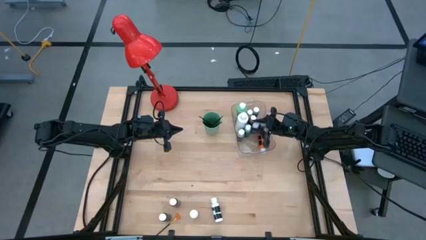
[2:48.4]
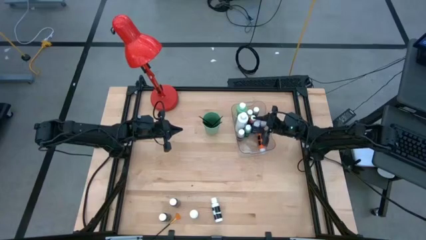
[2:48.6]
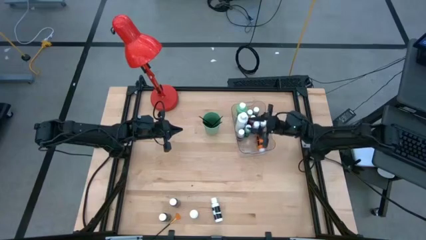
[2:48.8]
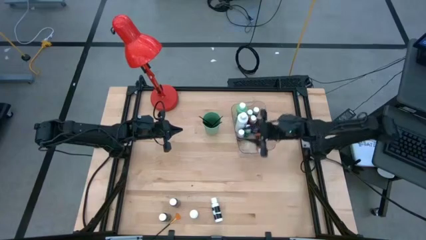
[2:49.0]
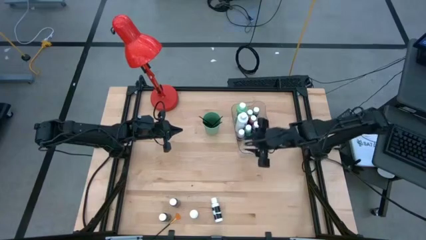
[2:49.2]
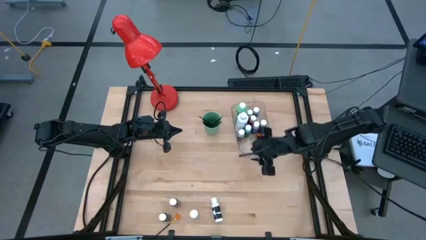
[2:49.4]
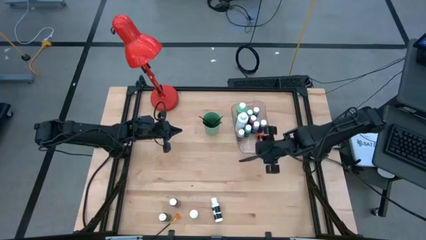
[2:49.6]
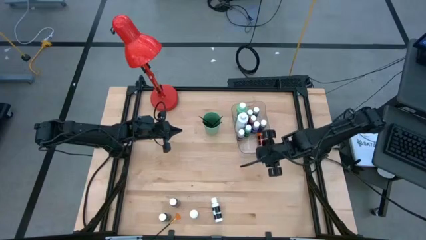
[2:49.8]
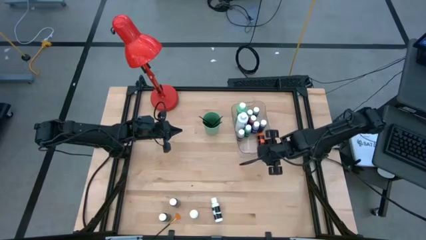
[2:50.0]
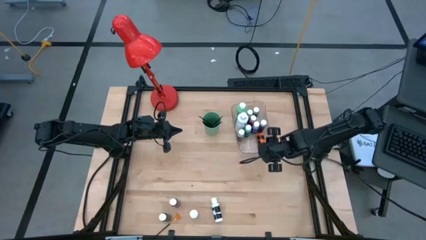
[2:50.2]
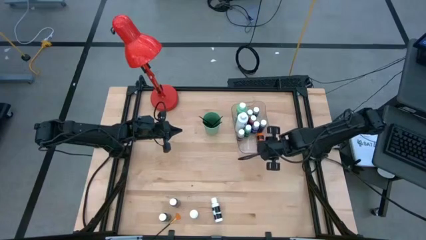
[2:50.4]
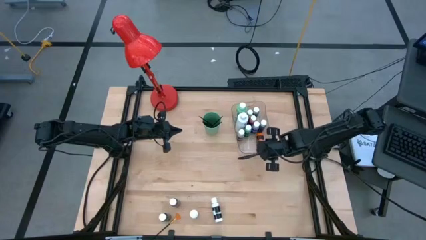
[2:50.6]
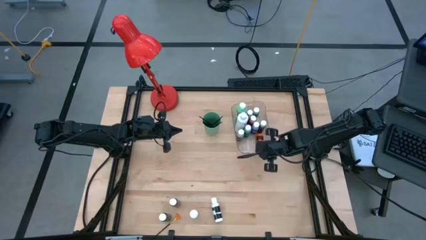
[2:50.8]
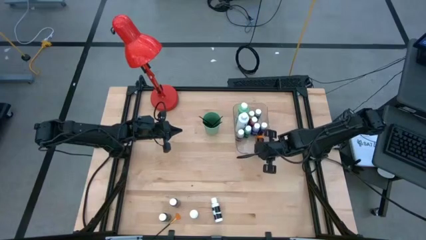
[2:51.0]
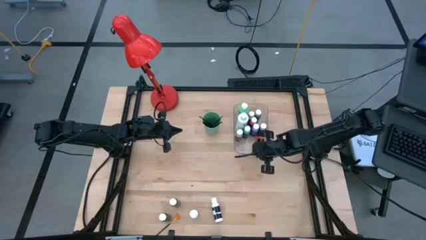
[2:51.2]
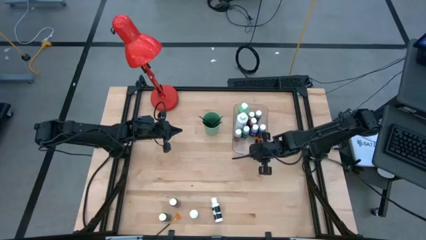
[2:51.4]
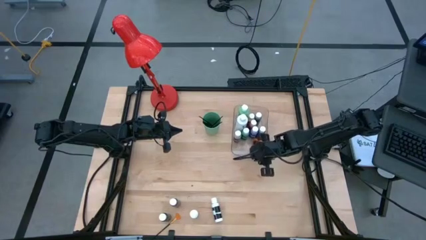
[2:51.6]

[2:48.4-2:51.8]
Task: Pick & Place Paint Supplies
Adjust the transparent bin

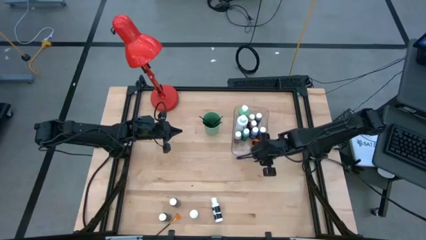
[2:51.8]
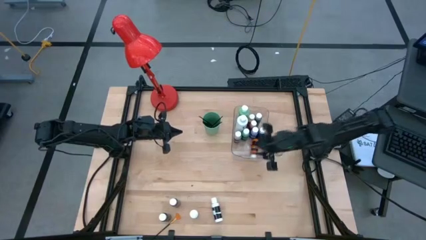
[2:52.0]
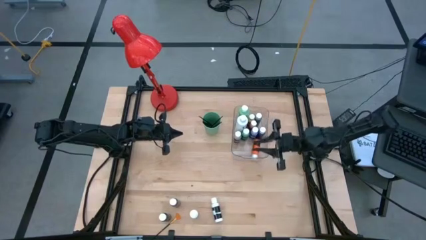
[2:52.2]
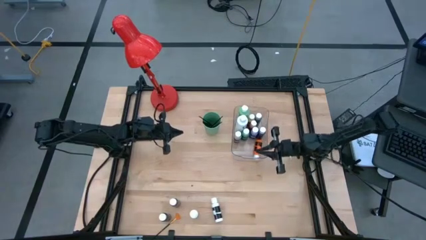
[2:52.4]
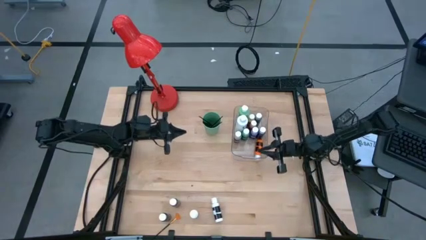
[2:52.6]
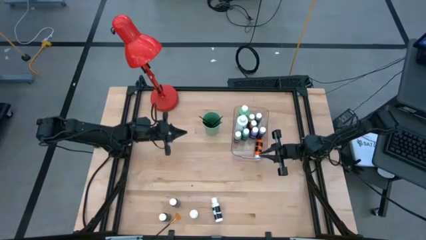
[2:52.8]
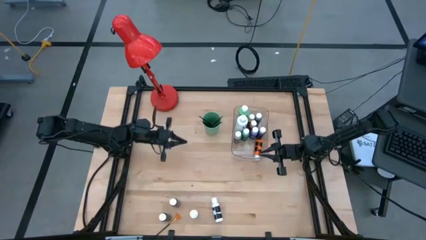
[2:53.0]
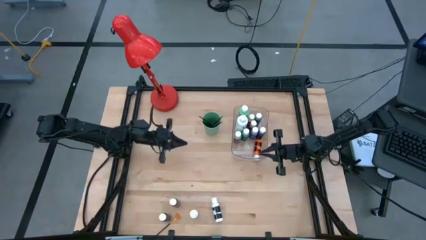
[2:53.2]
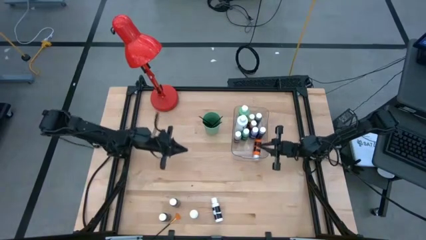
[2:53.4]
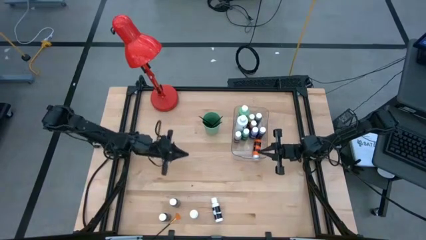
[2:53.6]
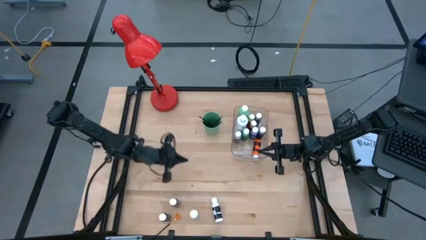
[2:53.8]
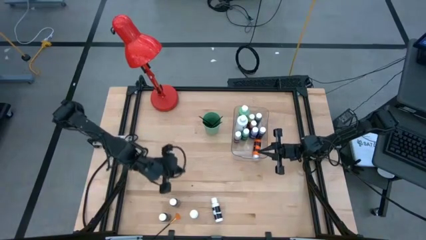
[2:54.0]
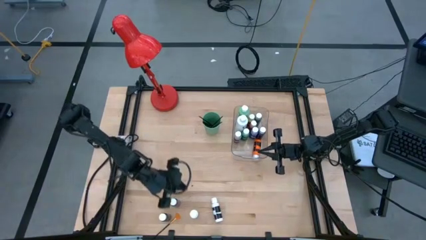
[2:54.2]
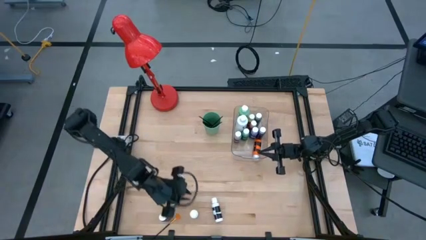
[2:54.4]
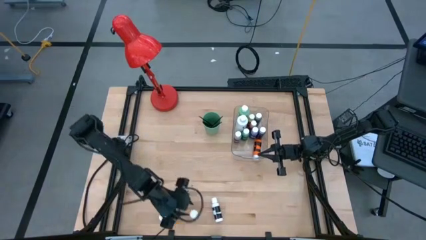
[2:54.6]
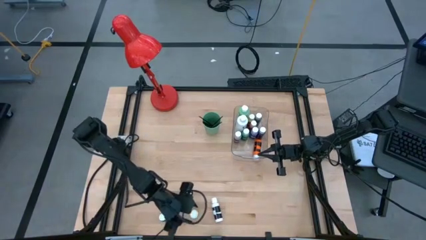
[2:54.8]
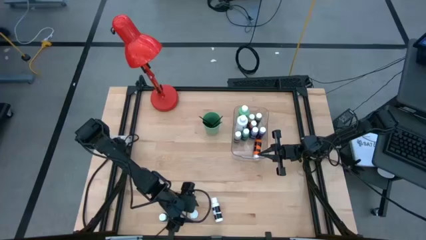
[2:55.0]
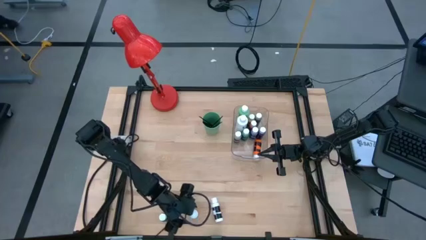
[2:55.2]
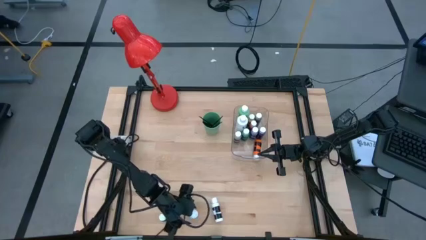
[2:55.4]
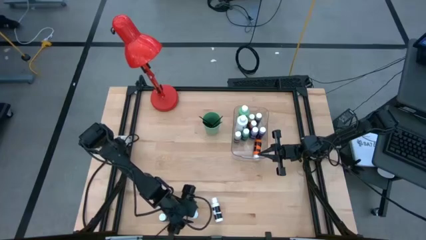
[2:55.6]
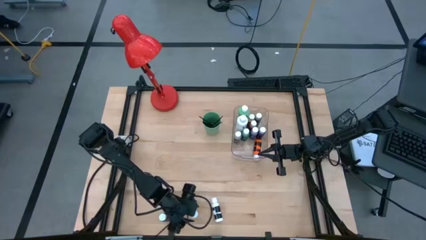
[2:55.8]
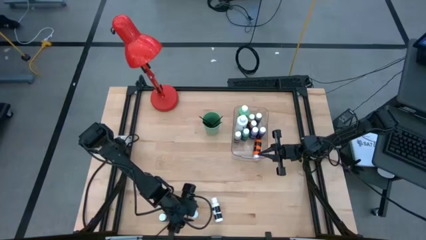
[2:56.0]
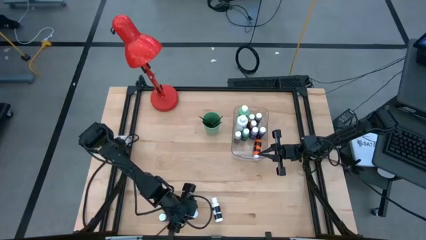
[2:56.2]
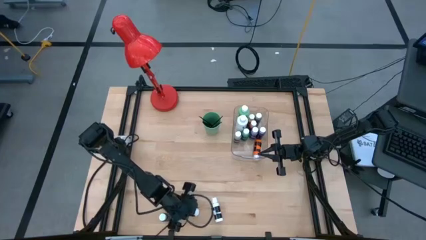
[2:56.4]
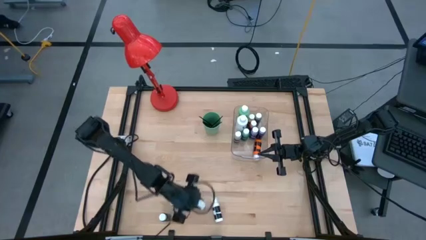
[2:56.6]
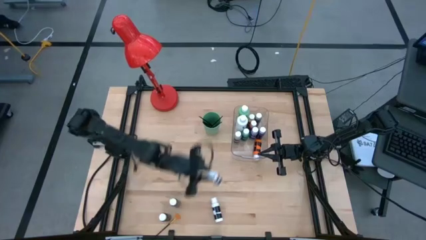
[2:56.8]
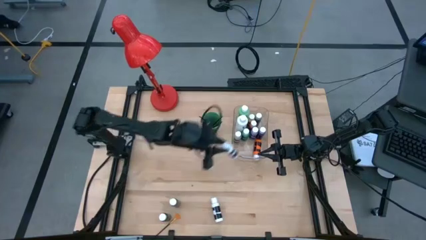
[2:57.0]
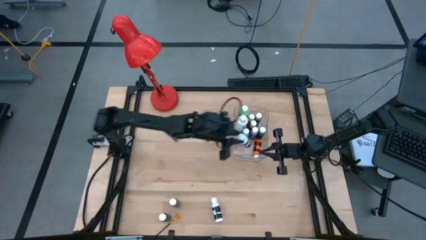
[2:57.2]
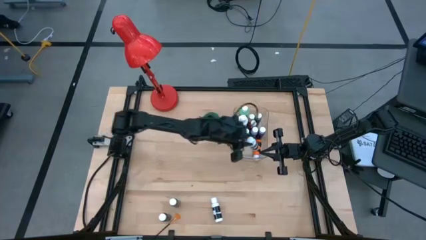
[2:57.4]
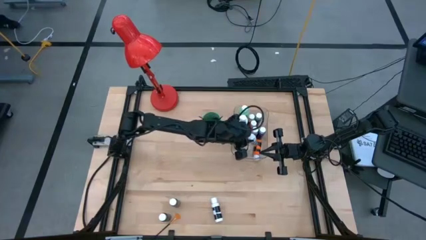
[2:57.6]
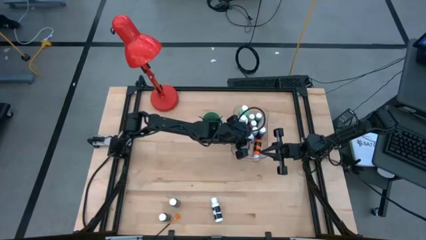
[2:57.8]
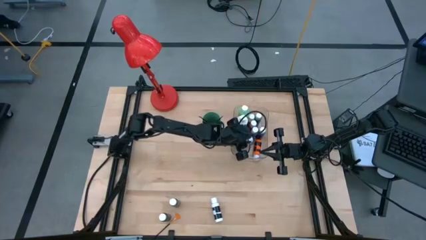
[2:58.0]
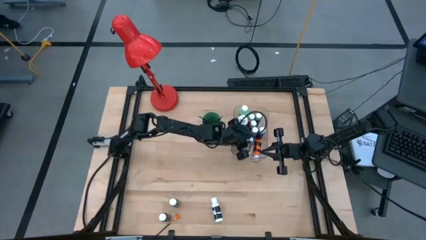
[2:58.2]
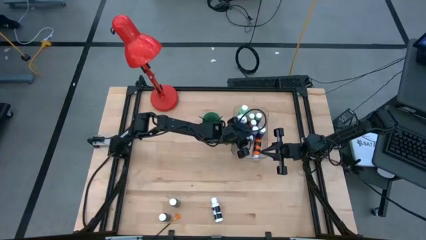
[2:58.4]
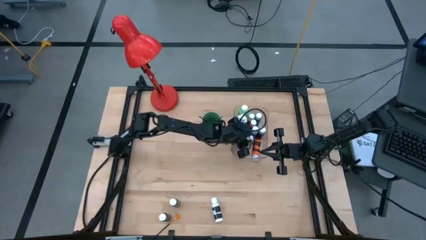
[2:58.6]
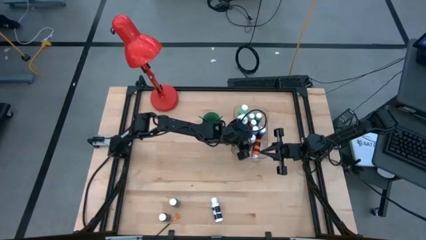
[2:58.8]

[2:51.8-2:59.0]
Put the white paint bottle into the transparent bin

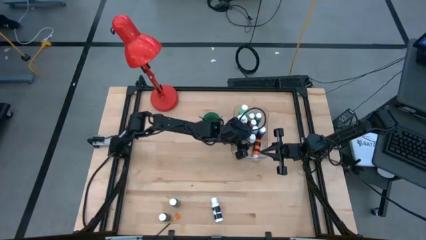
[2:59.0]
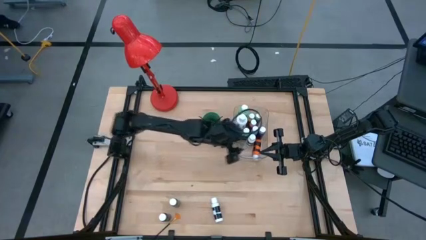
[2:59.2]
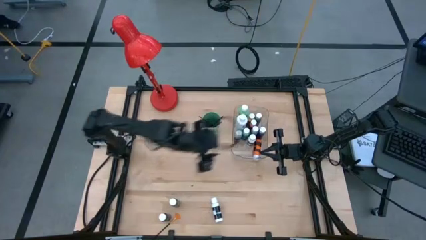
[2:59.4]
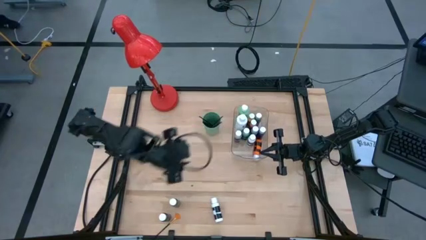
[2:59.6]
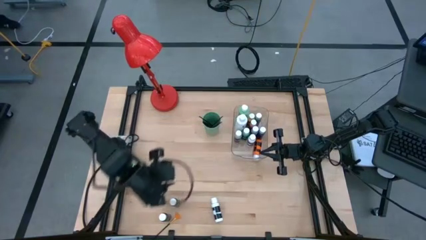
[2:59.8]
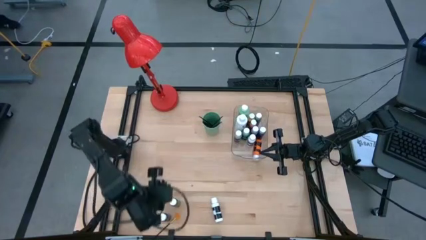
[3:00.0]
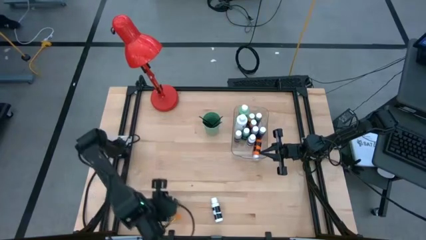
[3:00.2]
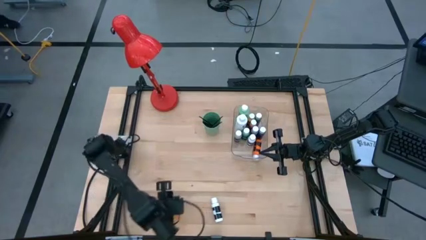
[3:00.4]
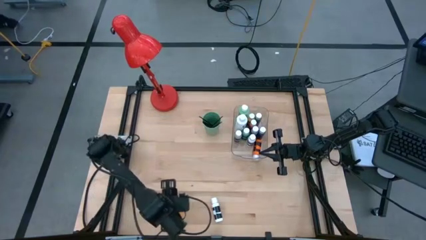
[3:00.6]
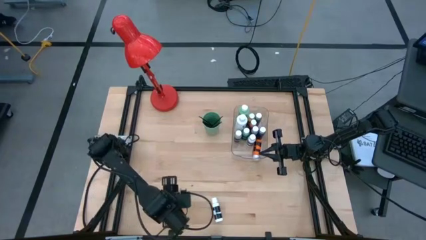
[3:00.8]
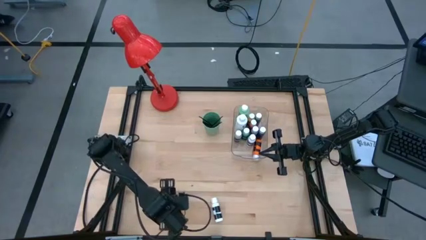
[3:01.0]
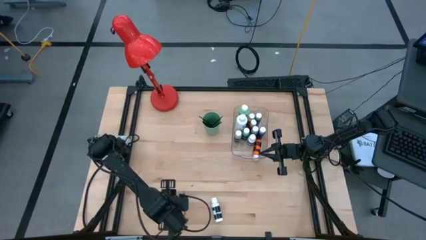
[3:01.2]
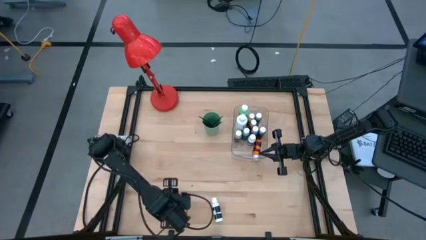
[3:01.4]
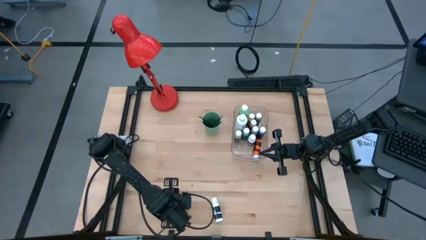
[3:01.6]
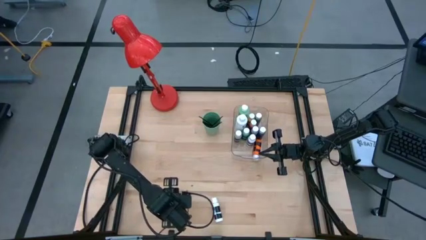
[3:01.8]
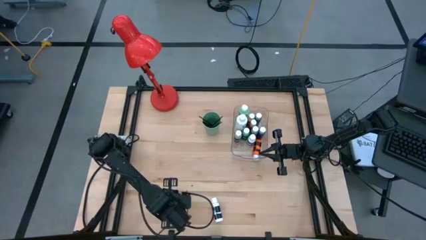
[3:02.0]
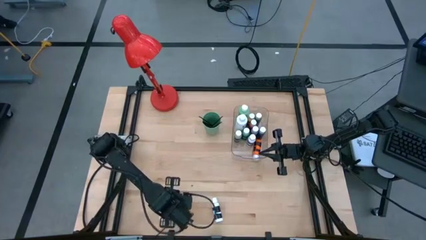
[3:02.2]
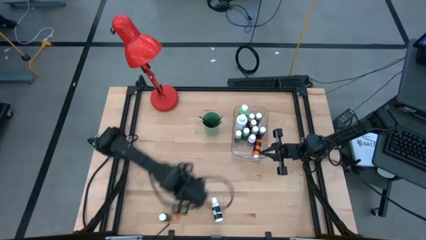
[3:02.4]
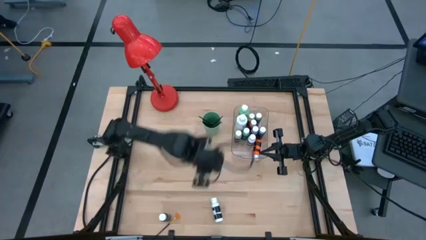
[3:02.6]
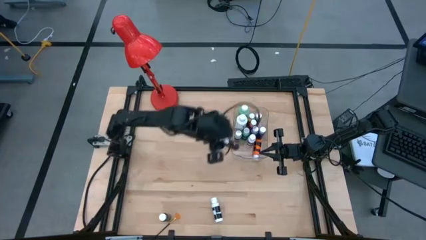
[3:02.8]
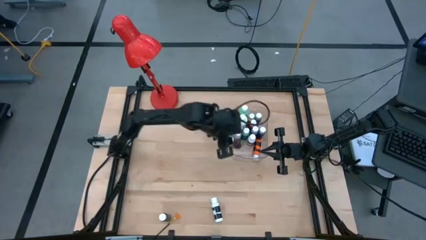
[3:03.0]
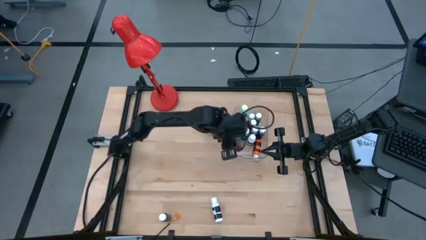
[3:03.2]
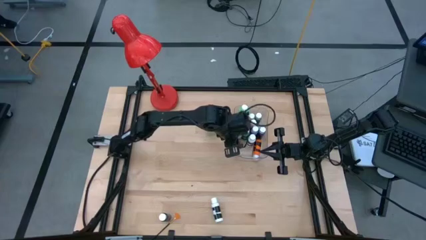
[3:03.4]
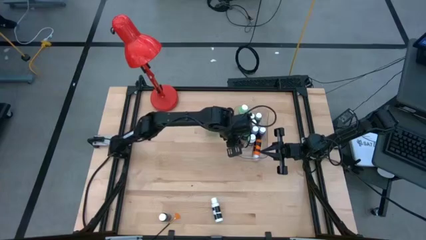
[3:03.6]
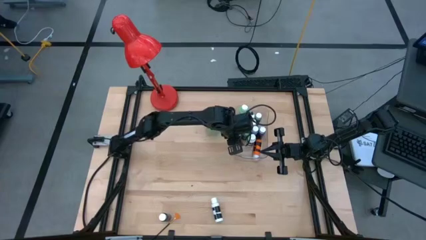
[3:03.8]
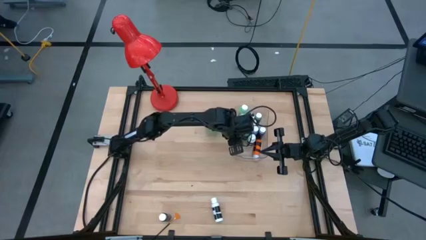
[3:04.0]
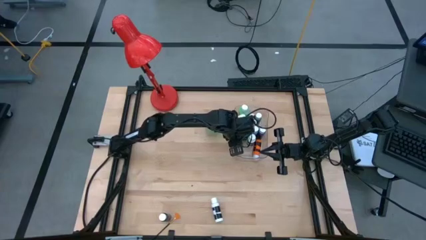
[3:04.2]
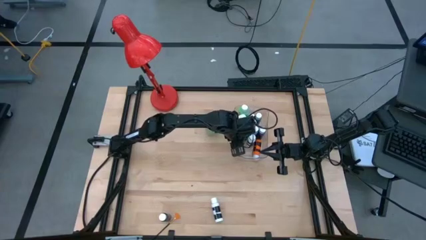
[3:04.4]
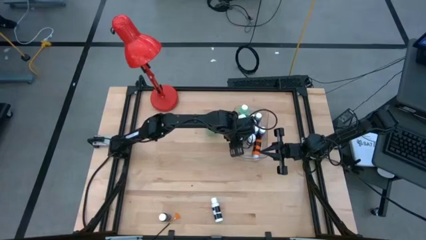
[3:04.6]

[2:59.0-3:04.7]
Put the brown paint bottle into the transparent bin
